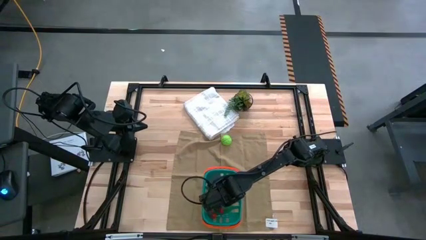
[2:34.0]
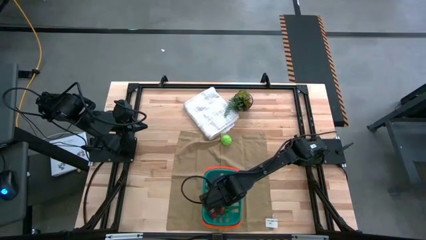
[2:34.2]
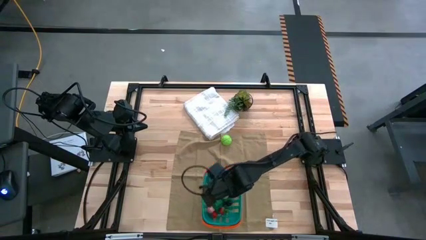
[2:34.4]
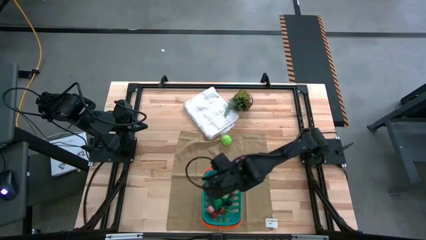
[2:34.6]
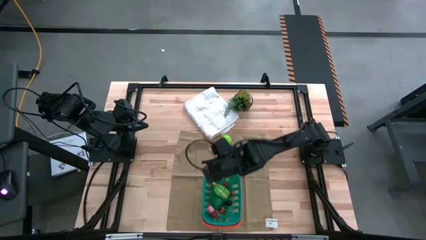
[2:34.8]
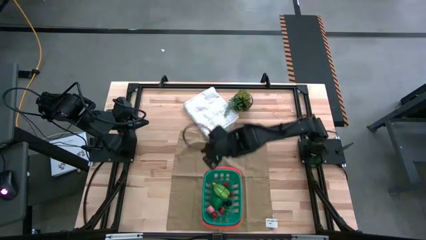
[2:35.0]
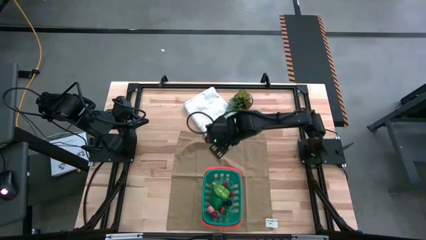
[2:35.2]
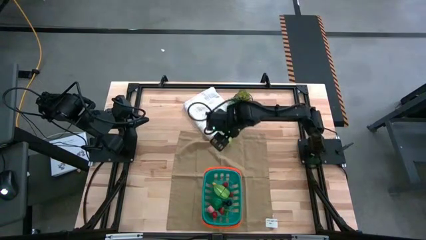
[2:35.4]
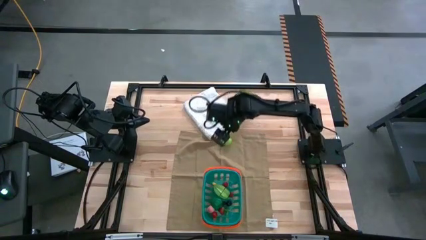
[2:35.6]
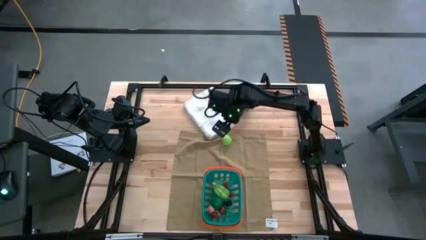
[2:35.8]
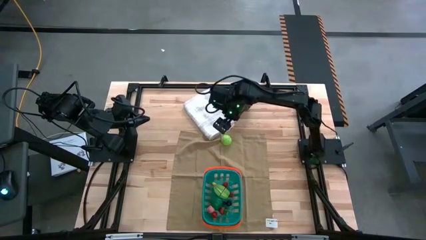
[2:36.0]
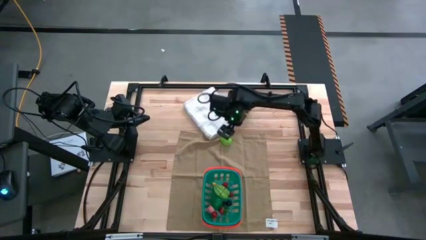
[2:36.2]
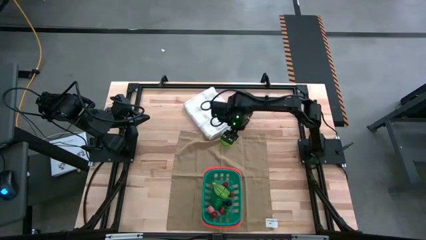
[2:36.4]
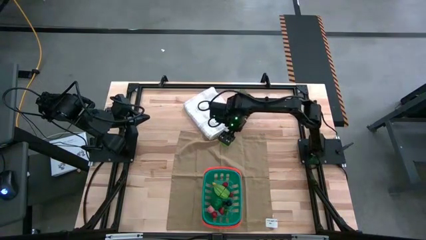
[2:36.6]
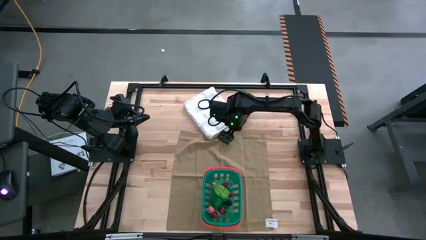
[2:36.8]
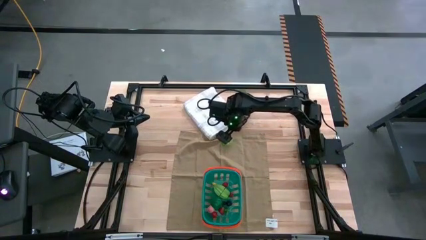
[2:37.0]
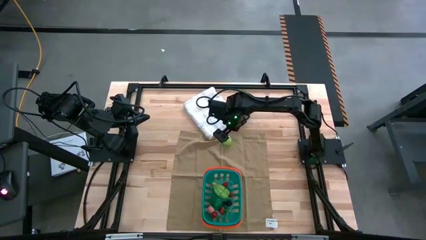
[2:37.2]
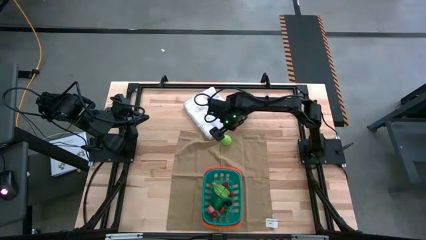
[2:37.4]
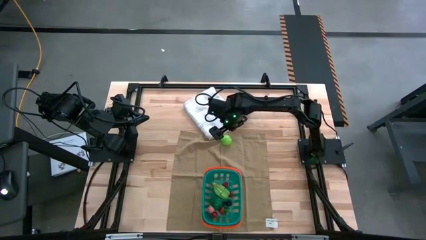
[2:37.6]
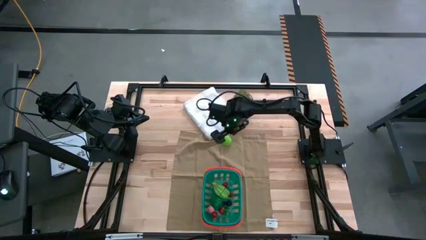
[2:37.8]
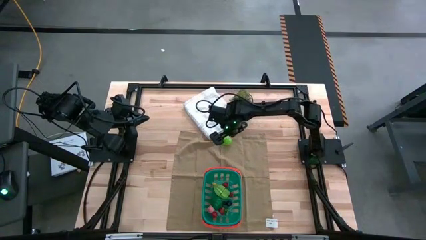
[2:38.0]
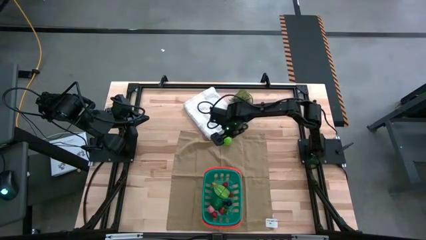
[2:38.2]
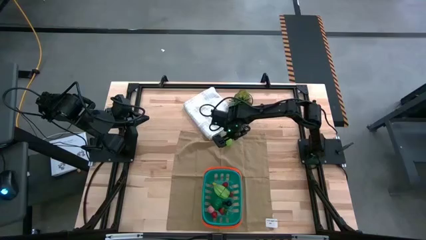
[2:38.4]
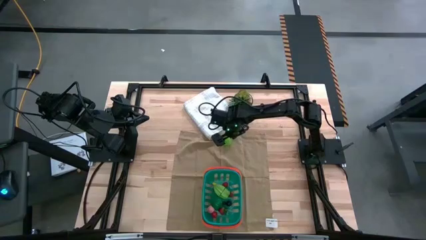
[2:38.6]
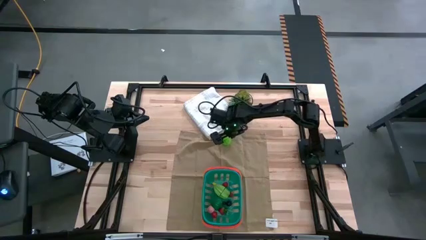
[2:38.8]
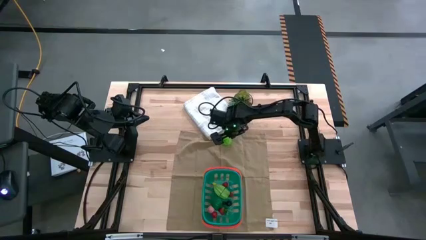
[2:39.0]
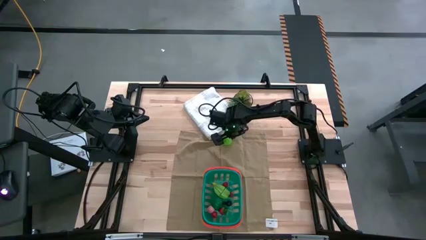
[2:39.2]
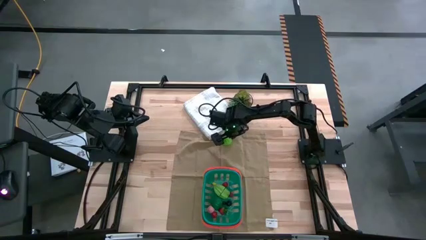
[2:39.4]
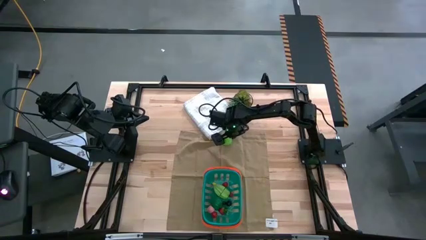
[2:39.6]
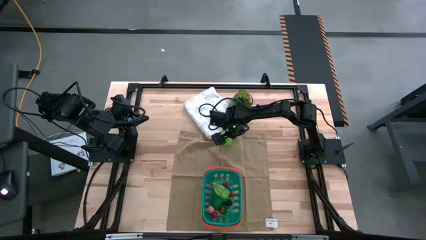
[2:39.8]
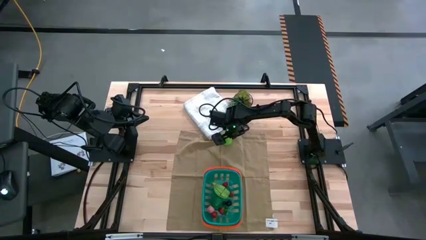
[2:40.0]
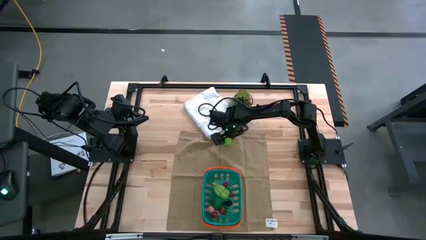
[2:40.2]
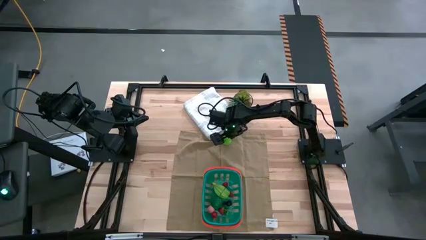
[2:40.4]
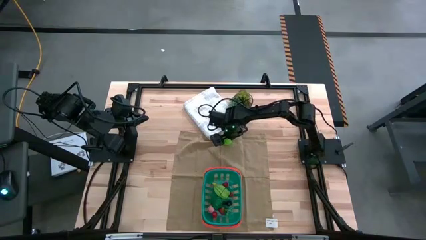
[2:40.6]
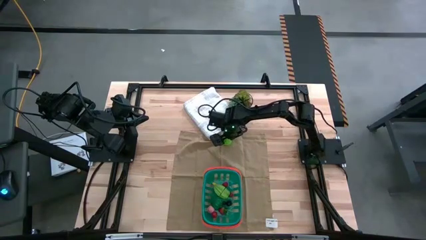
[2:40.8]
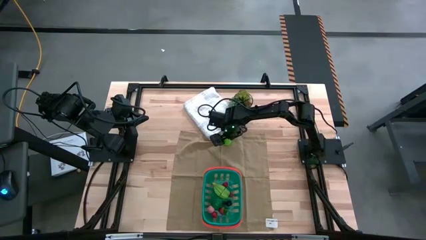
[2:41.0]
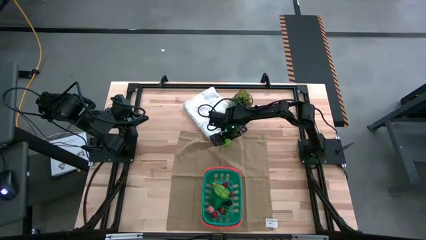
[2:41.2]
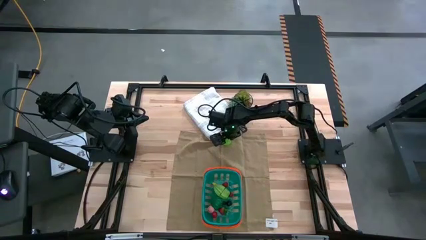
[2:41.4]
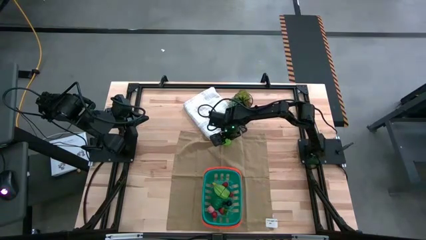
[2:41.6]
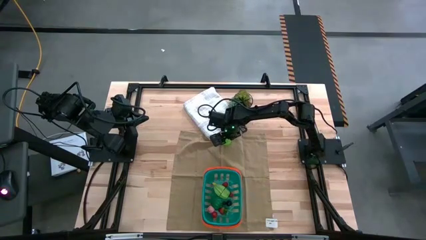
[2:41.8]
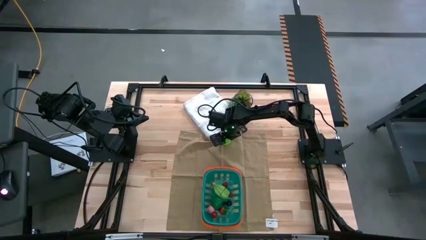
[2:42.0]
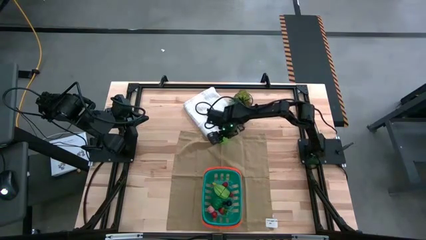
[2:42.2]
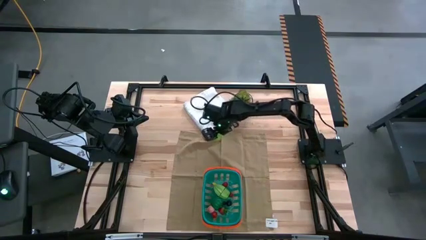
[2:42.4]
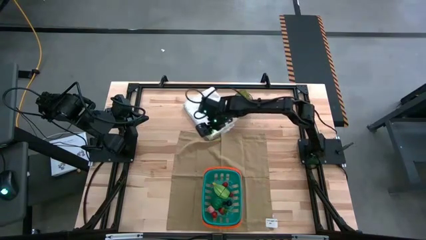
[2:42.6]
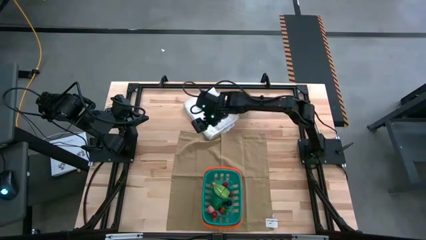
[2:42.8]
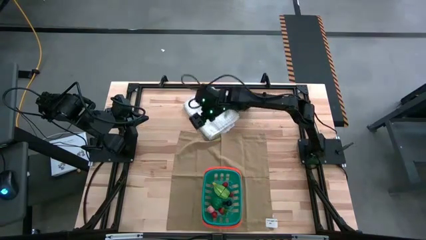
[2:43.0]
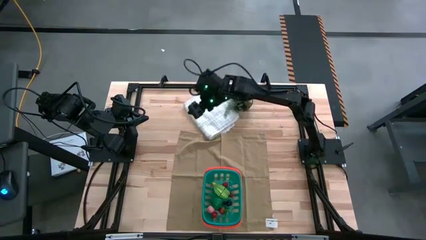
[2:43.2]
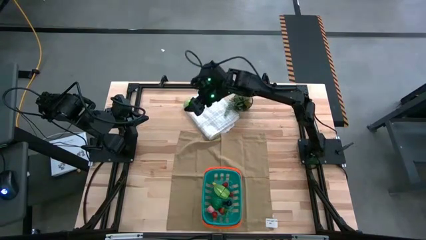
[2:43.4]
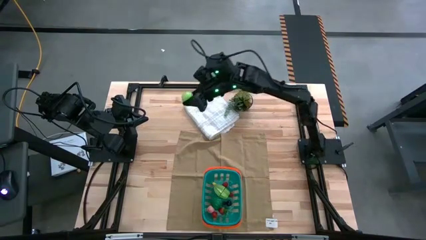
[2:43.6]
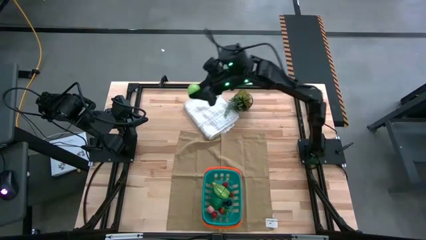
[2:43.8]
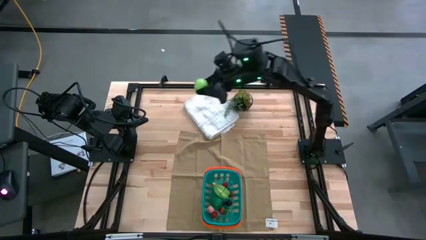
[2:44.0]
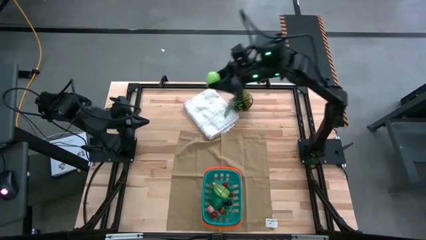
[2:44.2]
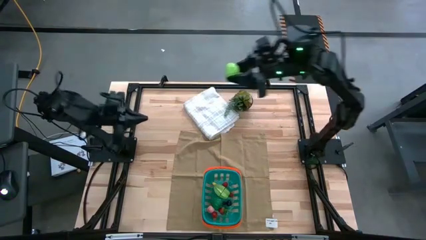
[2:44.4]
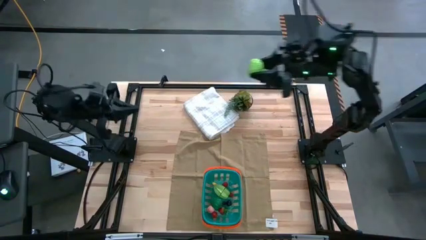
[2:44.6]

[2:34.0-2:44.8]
Task: Pick and placing Produce into tupperware
Put the green cabbage into the blue bin

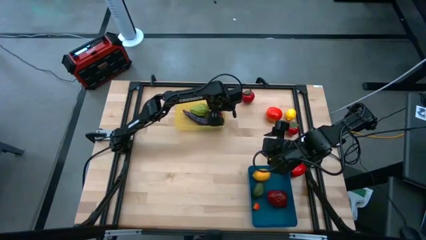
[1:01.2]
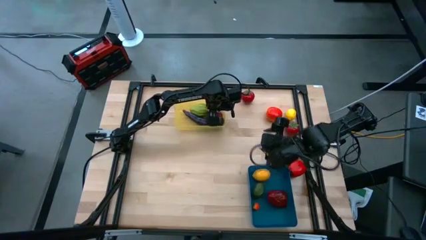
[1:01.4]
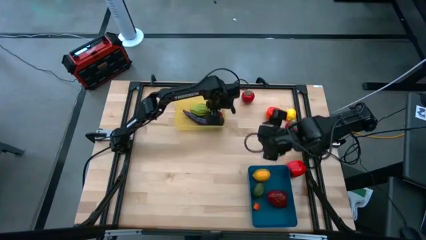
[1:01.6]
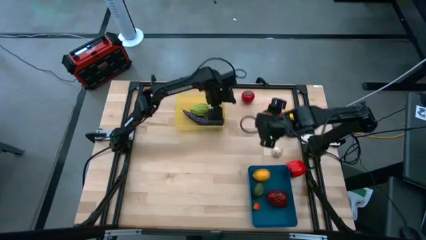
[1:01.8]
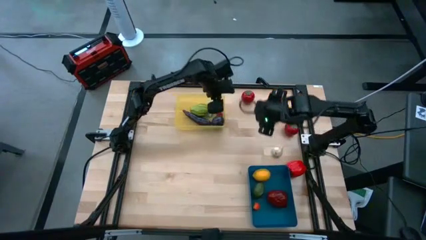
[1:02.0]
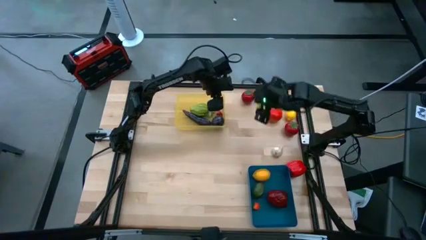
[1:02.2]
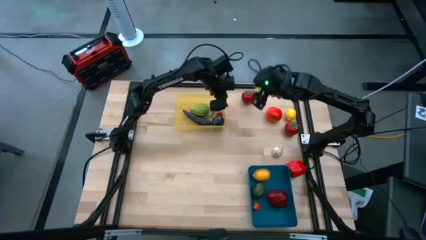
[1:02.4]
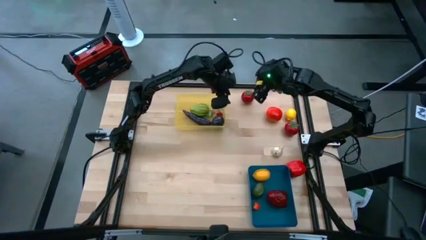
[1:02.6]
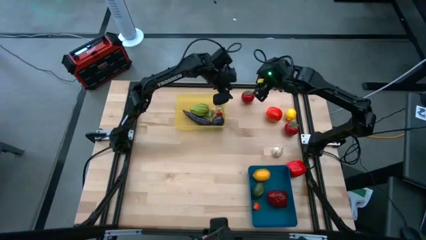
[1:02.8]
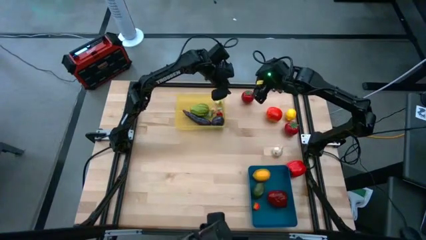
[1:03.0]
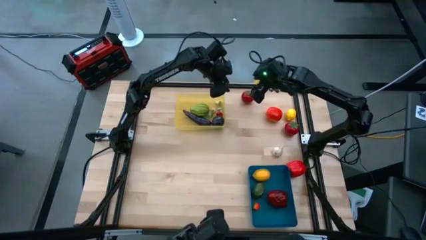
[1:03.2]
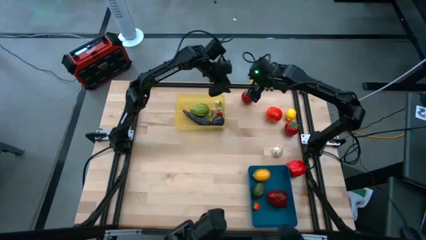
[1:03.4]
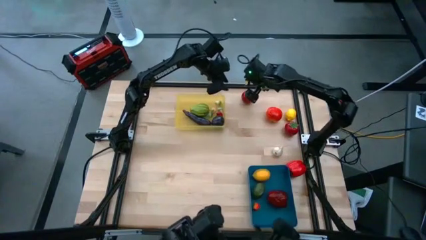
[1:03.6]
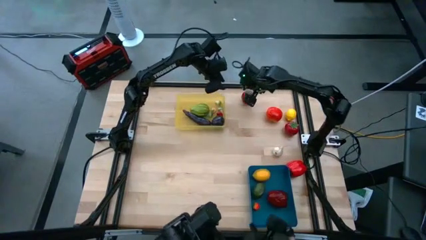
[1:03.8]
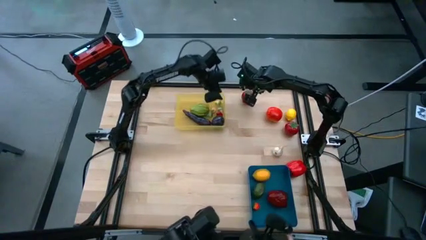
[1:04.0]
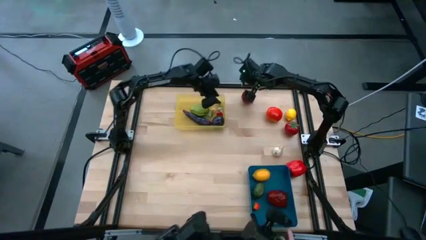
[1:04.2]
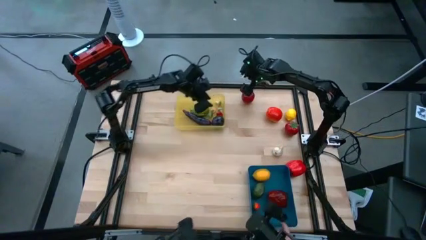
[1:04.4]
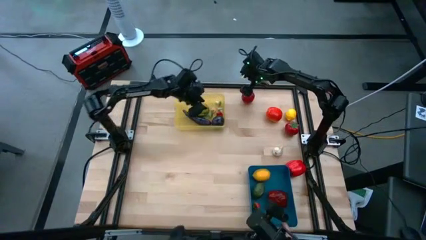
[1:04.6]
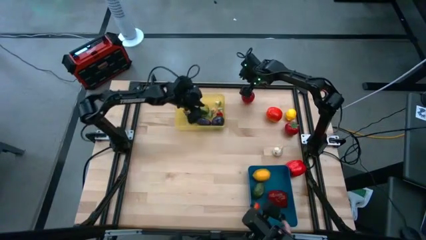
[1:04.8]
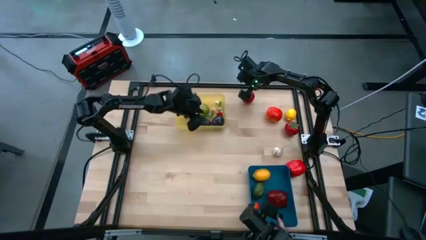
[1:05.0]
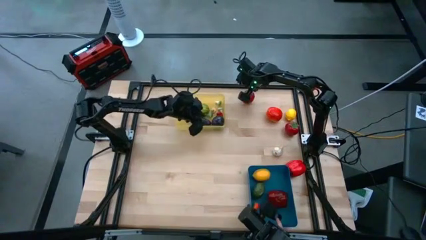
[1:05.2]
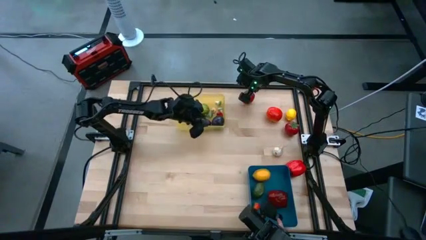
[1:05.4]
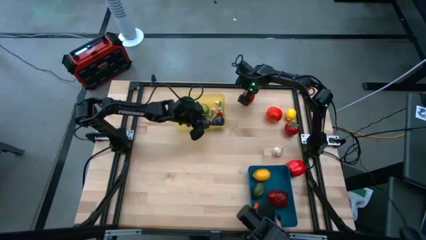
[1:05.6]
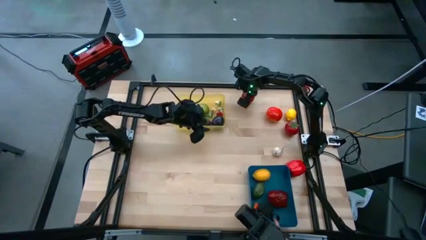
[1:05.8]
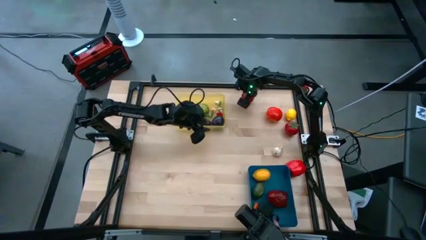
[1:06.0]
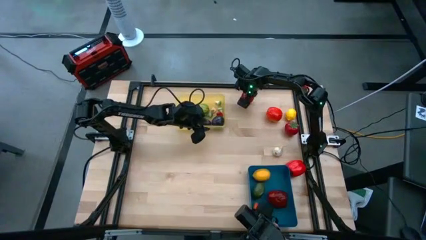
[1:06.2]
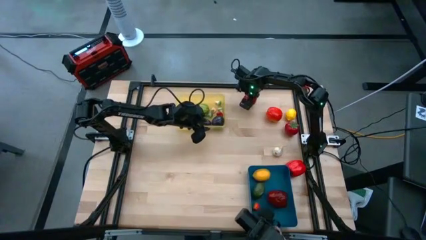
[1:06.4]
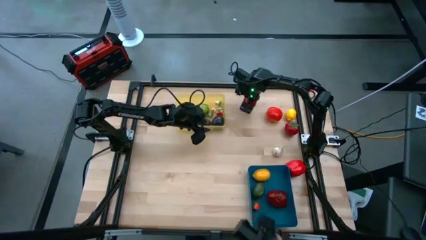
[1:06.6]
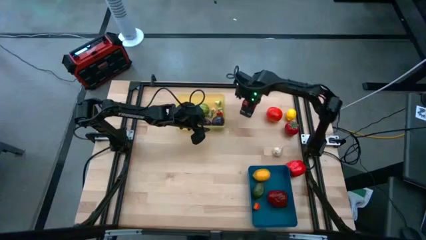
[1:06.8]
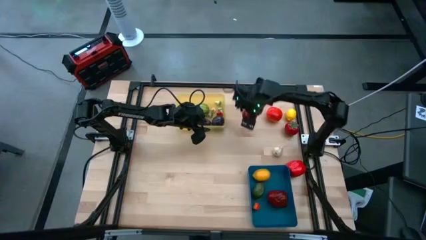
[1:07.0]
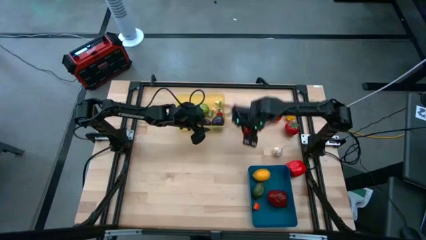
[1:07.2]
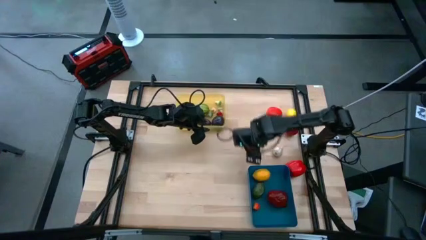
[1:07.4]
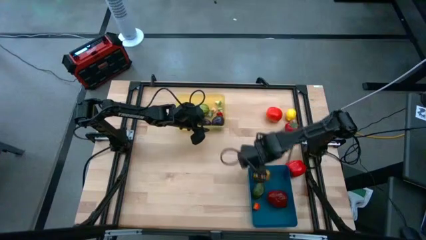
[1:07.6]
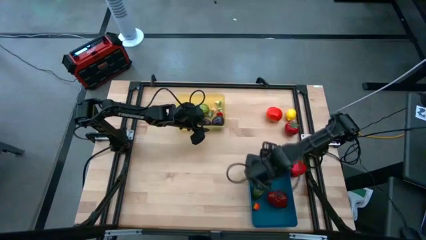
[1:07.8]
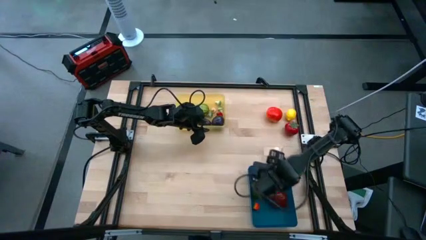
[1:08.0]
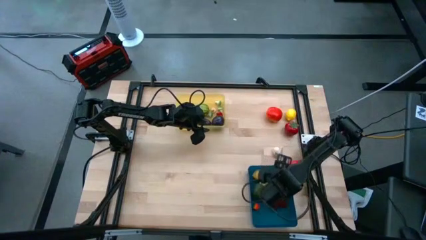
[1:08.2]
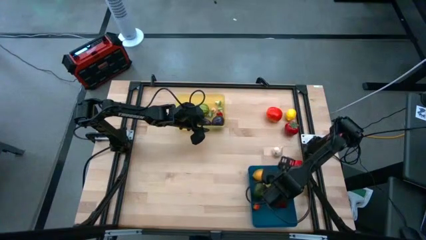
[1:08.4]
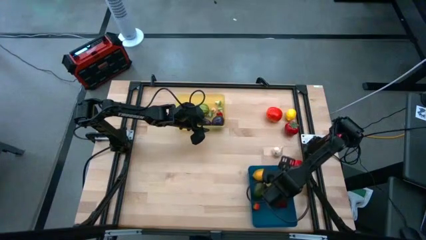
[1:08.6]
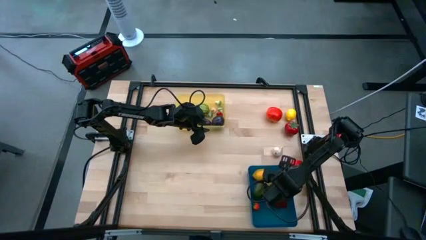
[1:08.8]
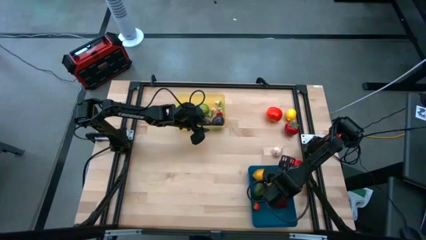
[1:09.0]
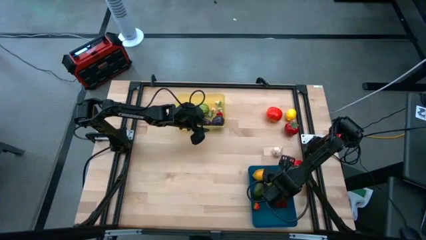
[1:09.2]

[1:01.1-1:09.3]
Task: Sort produce into baskets
Put the red tomato into the blue bin
